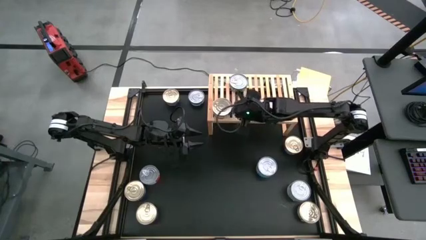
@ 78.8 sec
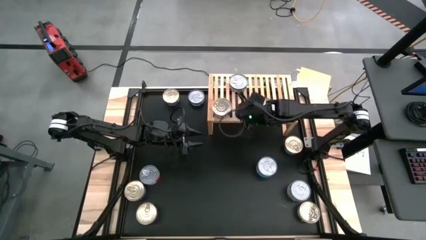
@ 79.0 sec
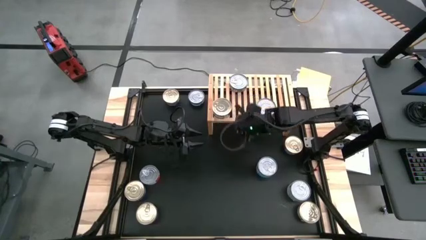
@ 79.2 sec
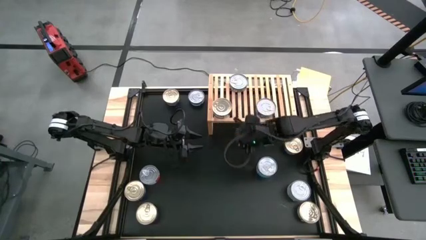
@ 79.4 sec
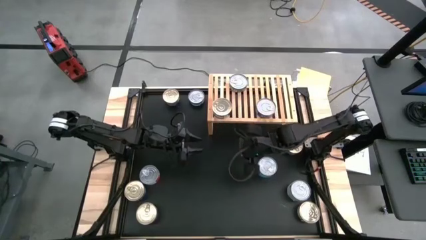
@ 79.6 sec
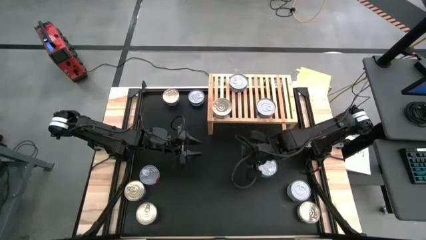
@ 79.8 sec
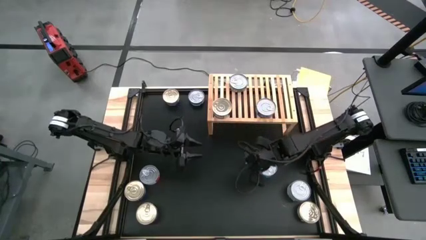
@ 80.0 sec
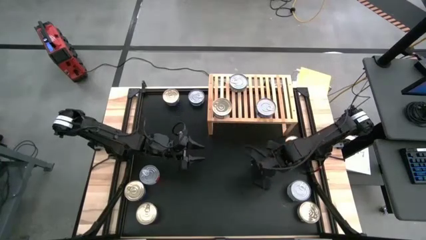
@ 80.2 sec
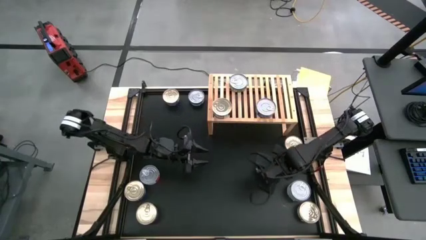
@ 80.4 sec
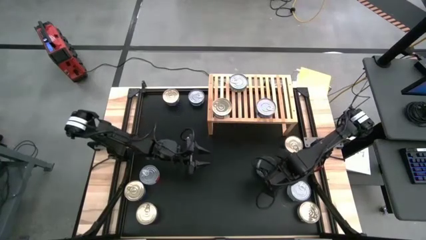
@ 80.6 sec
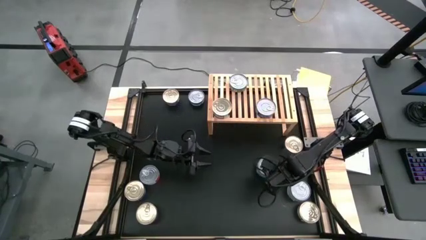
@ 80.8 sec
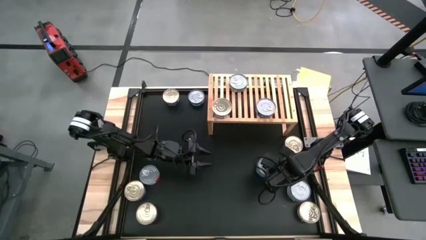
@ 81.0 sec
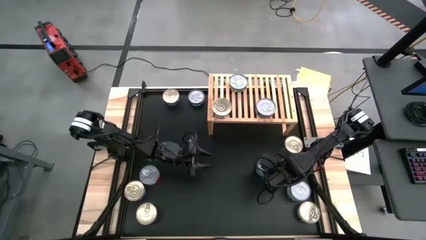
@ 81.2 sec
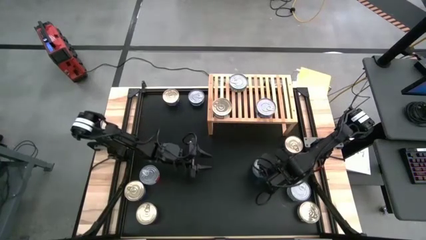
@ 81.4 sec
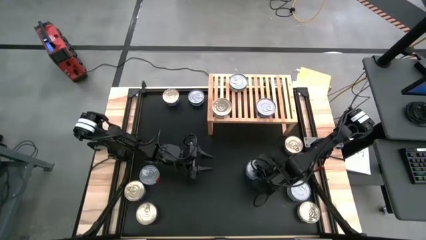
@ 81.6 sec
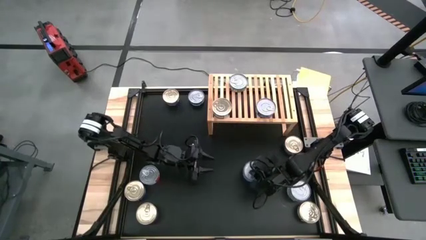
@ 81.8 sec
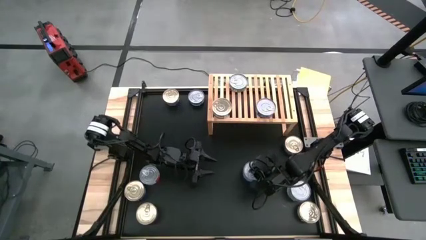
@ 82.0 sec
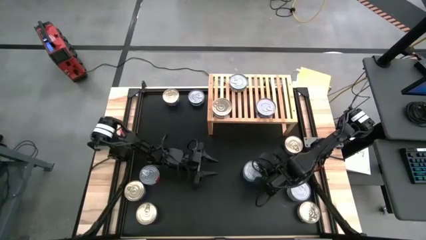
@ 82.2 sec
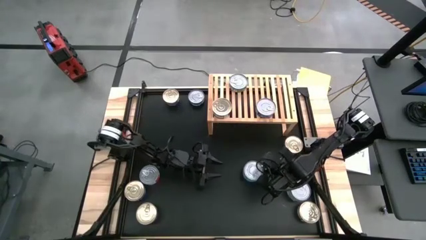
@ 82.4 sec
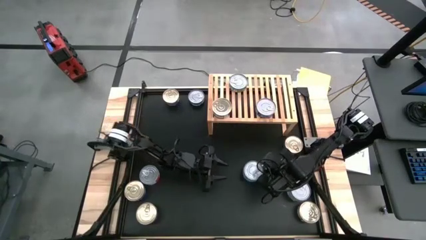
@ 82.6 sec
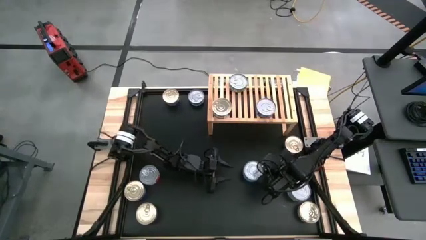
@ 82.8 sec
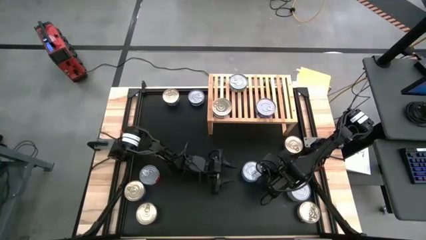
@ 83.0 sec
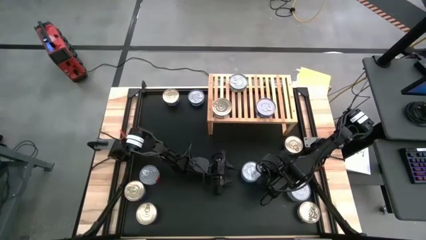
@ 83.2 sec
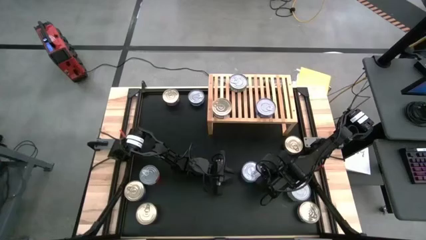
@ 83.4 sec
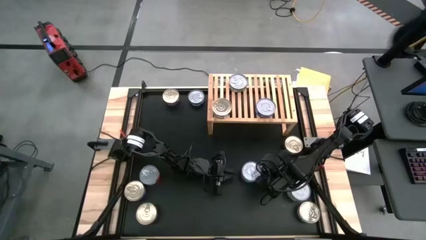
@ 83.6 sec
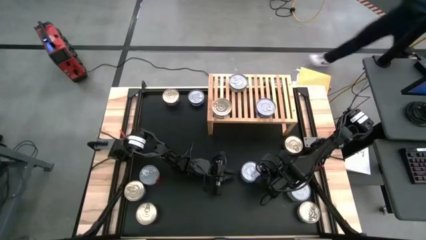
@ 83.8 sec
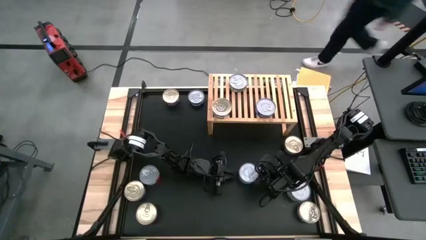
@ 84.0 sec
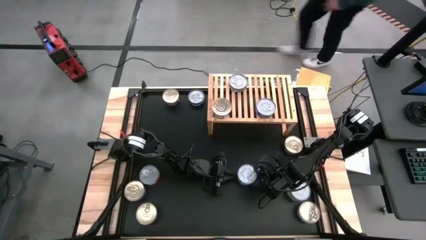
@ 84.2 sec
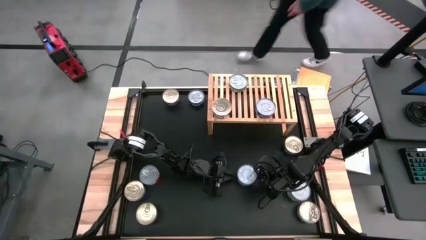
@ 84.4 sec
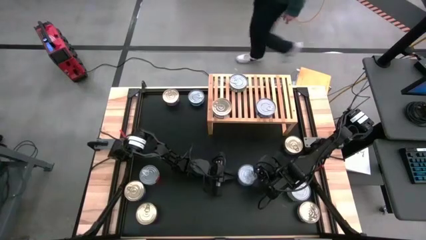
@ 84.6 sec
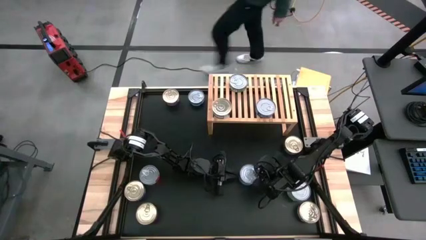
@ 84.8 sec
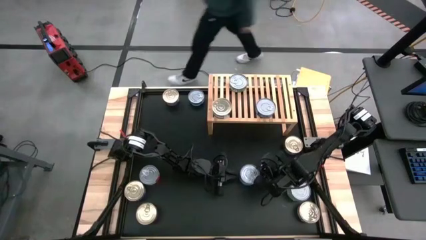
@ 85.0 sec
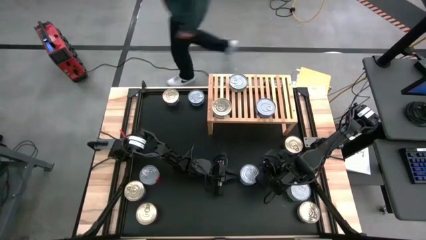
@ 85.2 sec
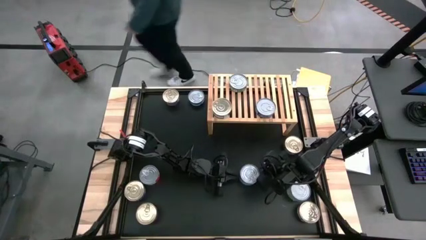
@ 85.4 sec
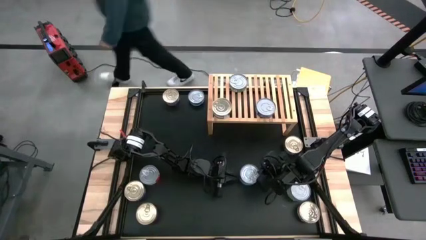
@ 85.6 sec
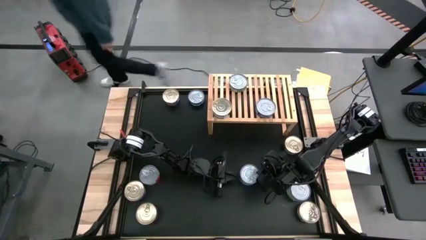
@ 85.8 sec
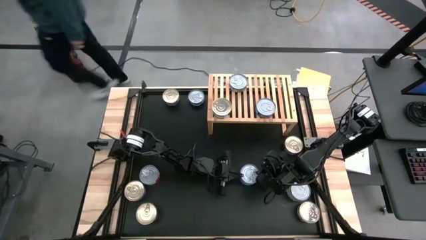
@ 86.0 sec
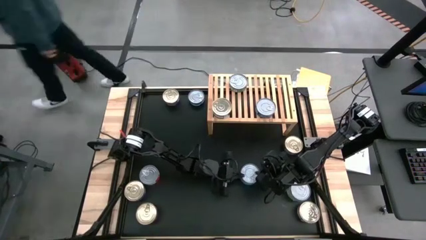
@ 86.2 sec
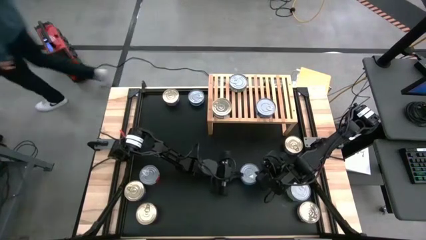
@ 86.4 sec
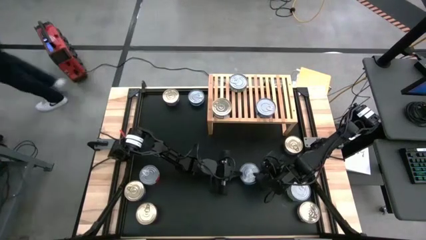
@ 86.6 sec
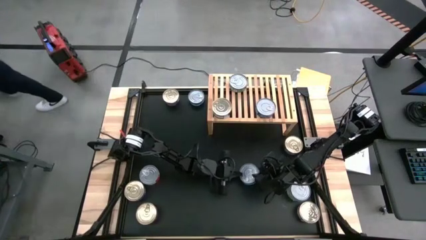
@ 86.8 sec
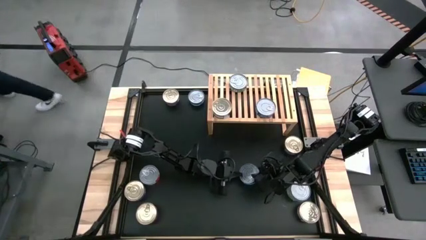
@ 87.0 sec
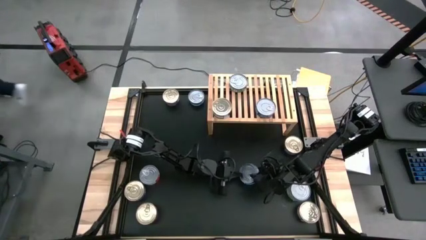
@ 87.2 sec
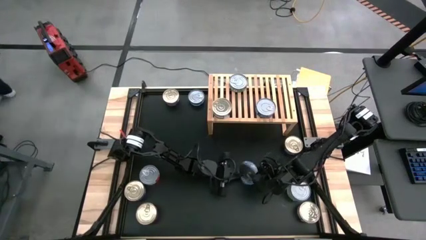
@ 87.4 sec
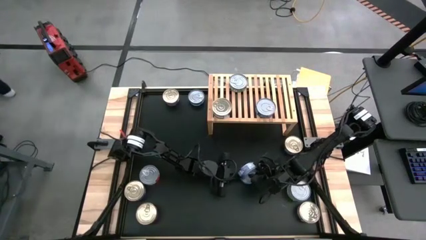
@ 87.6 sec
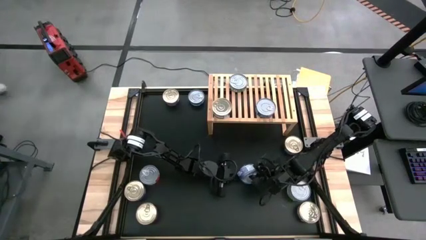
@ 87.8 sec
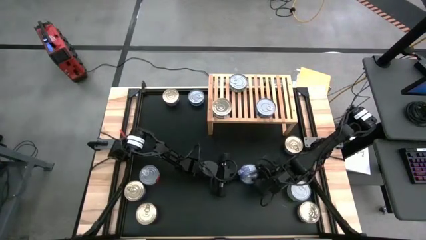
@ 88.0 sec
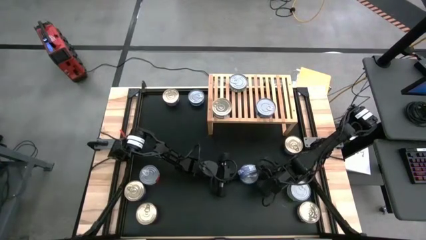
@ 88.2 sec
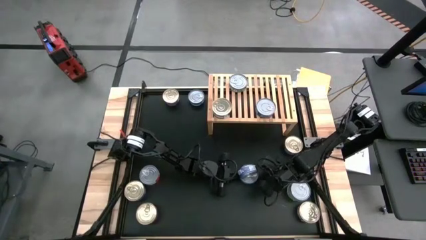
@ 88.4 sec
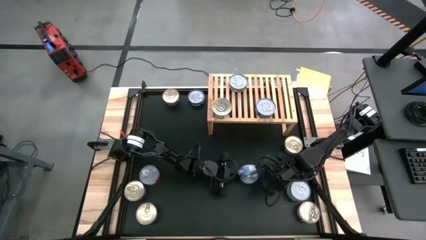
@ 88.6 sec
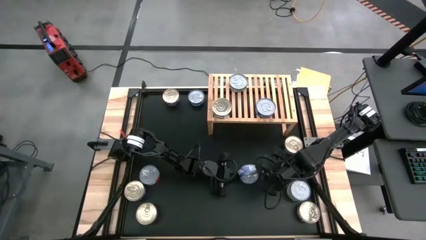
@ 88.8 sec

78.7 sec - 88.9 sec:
Task: Stack canned seafood by type on shelf
Stack the blue tuna can on top of the blue tuna can on the shelf
